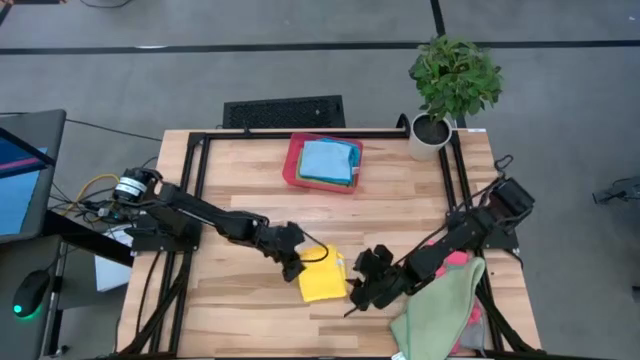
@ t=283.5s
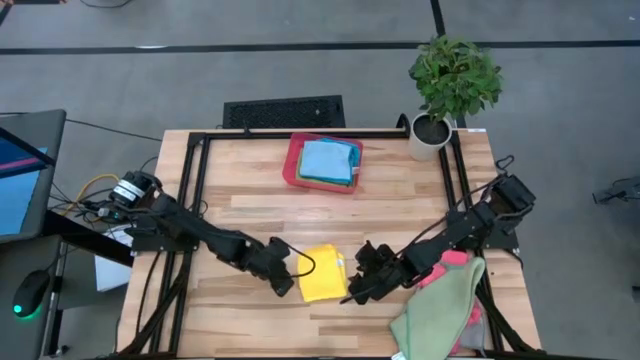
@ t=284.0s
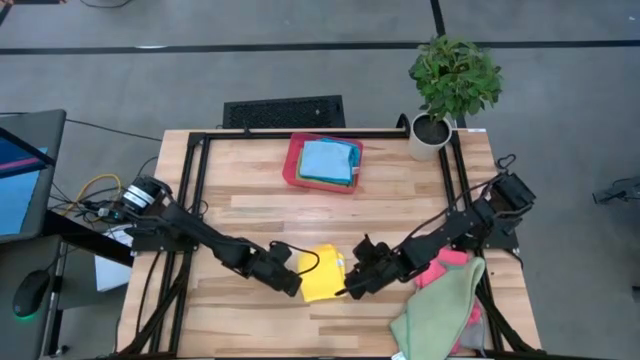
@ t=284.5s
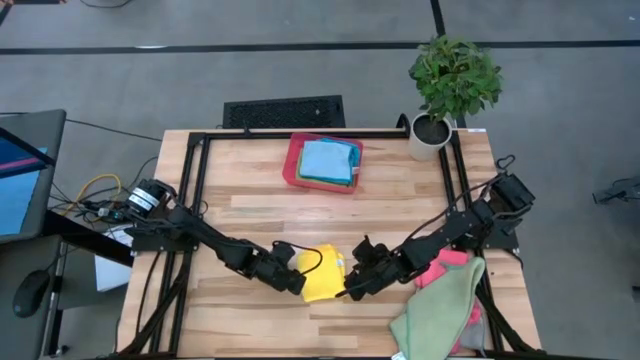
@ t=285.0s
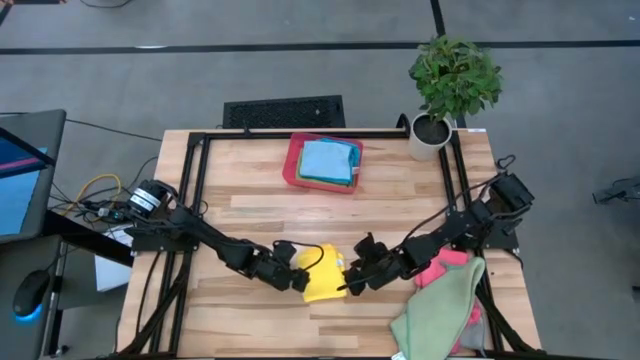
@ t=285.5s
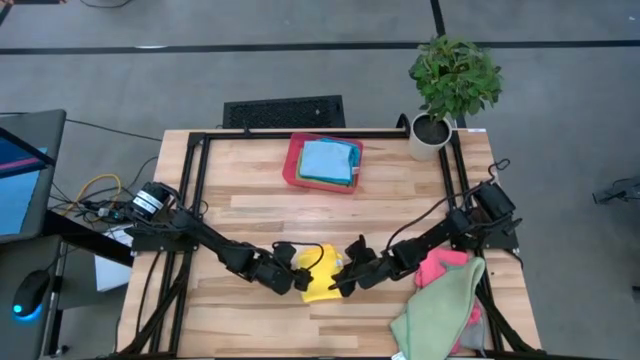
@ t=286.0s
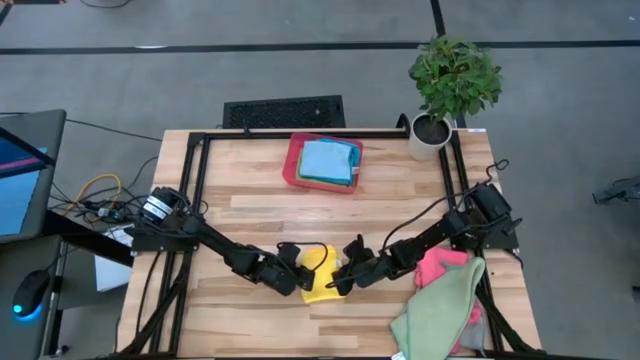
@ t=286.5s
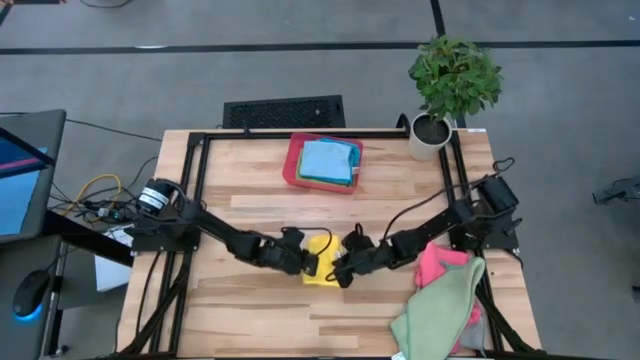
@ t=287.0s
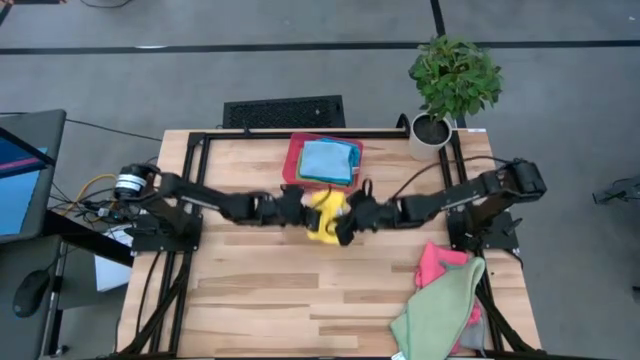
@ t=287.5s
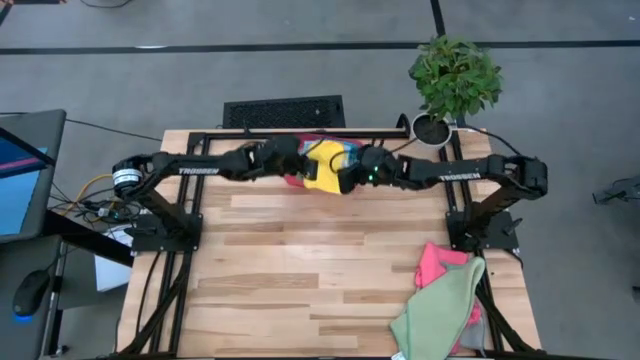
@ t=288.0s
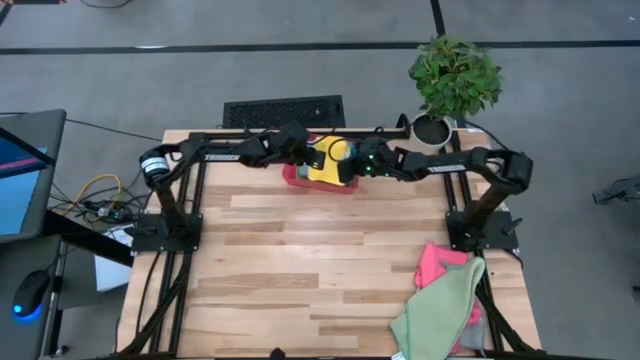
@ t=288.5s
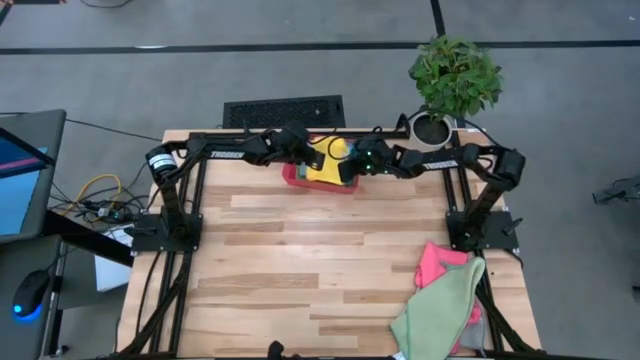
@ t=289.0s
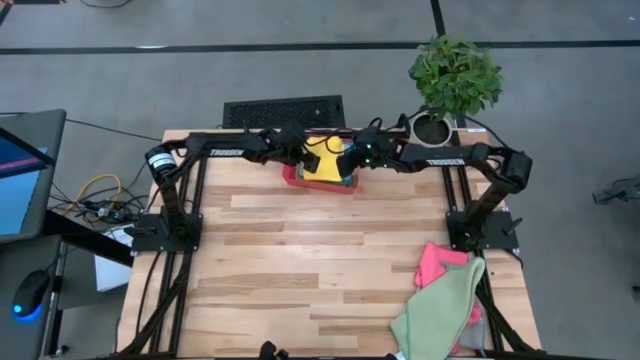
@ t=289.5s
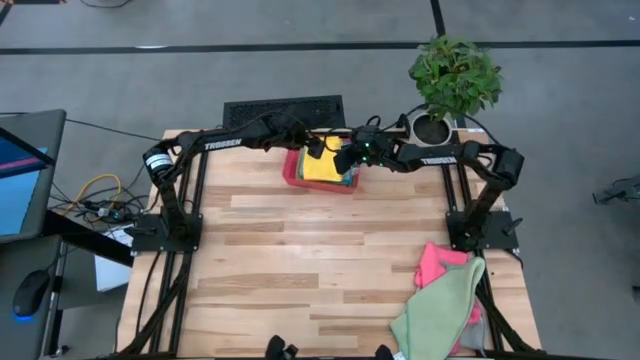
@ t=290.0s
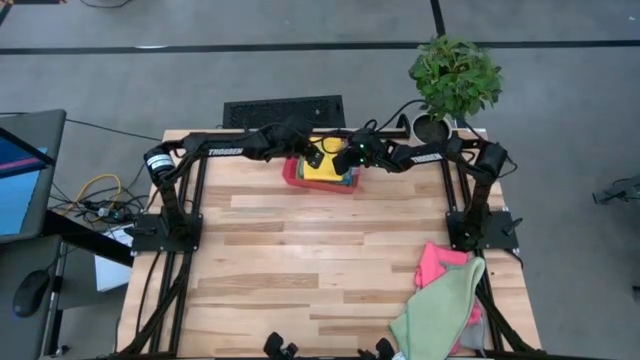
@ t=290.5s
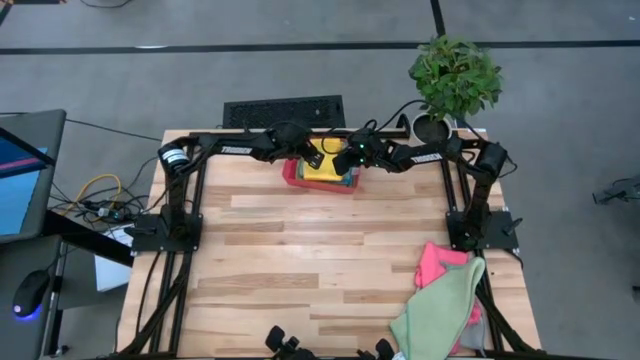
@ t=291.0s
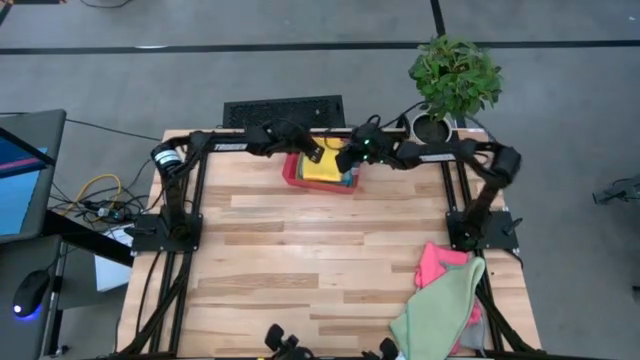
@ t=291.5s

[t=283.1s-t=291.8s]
Task: Fold microfiber towels
Stack the yellow microfiber cloth on top of the light blue microfiber cloth in the red bin

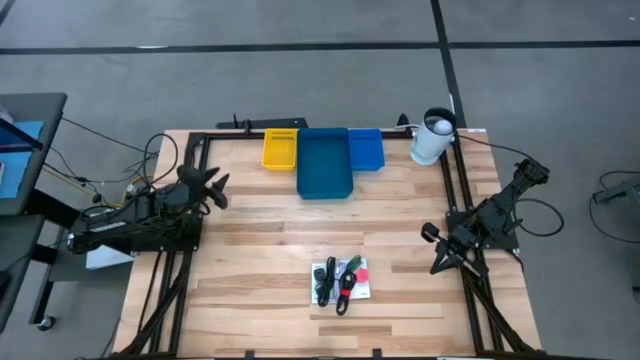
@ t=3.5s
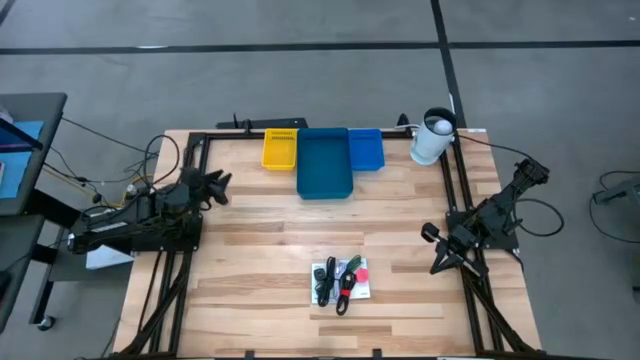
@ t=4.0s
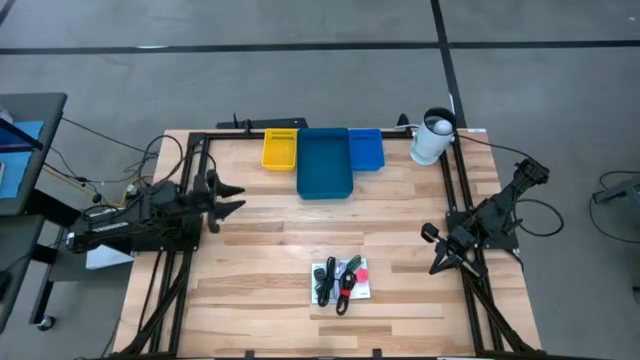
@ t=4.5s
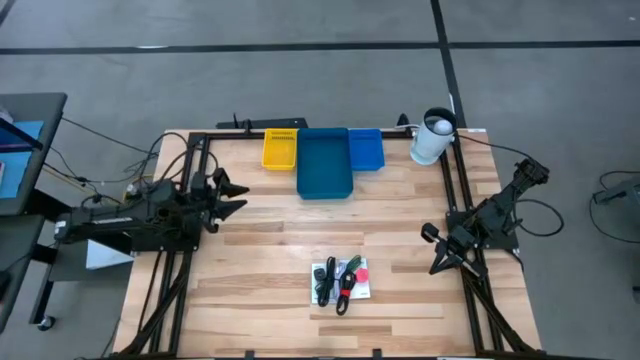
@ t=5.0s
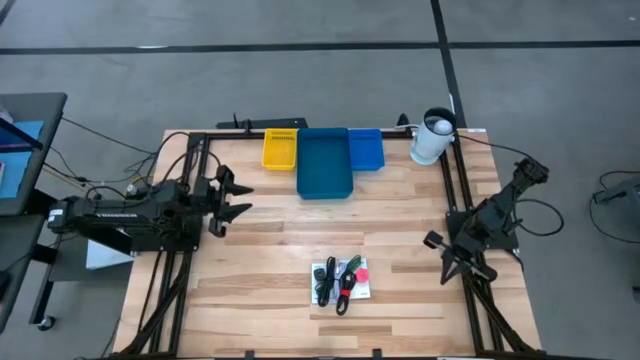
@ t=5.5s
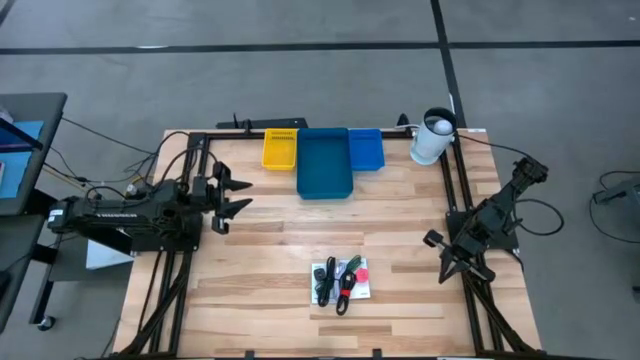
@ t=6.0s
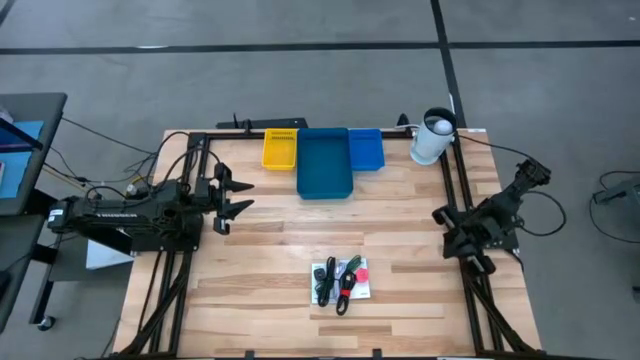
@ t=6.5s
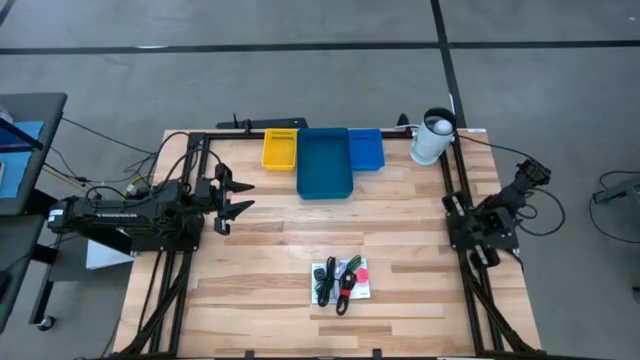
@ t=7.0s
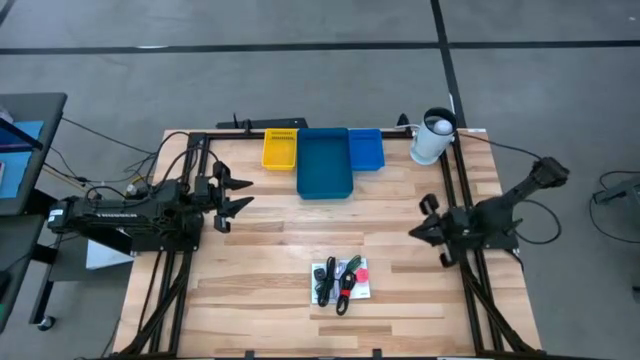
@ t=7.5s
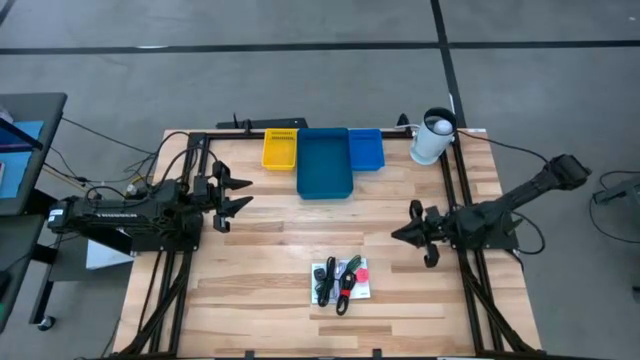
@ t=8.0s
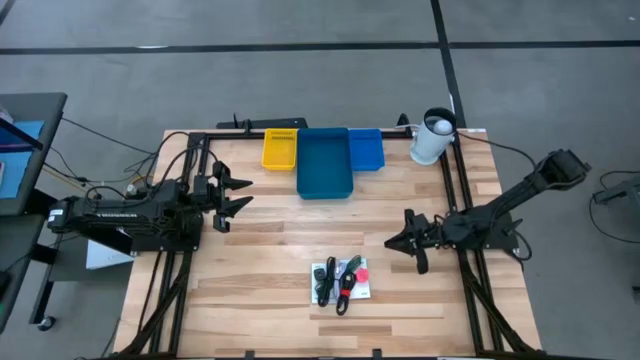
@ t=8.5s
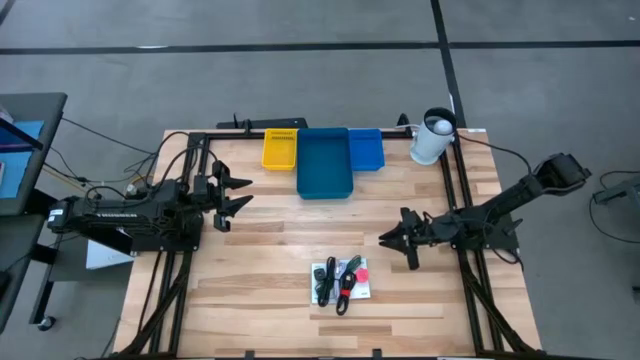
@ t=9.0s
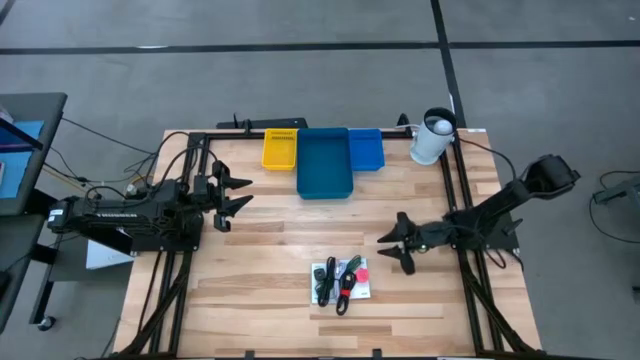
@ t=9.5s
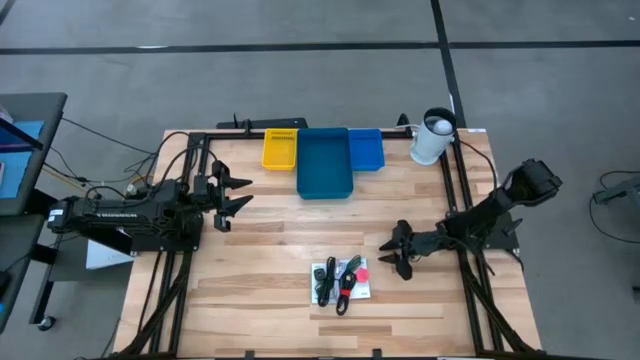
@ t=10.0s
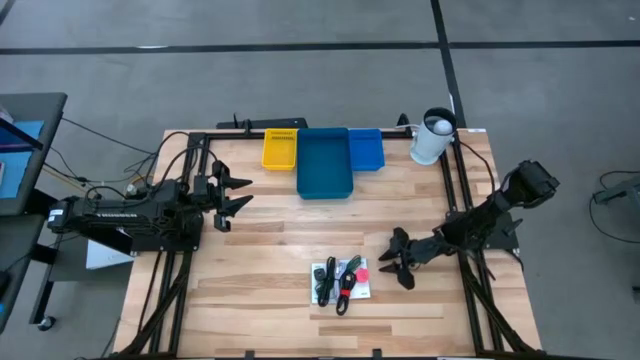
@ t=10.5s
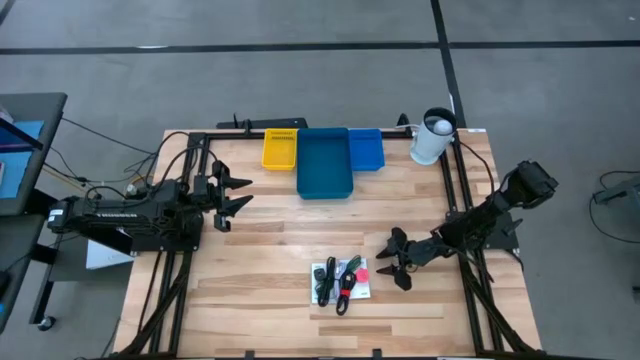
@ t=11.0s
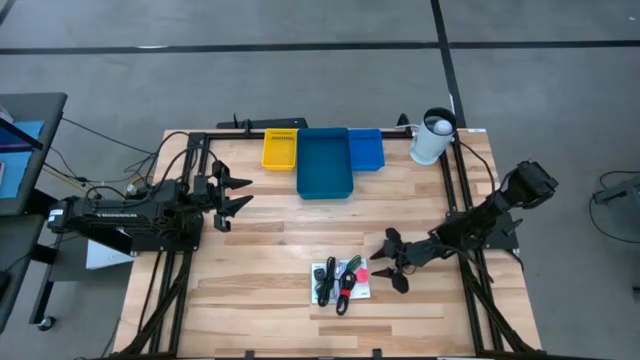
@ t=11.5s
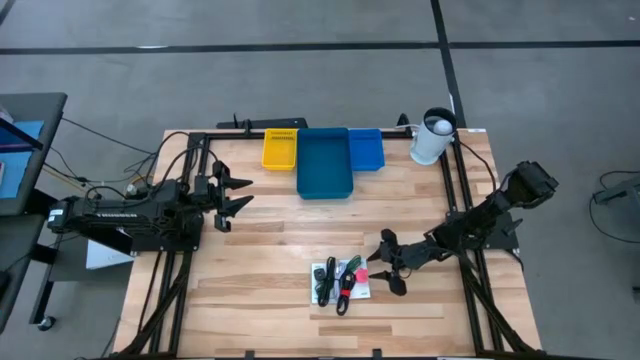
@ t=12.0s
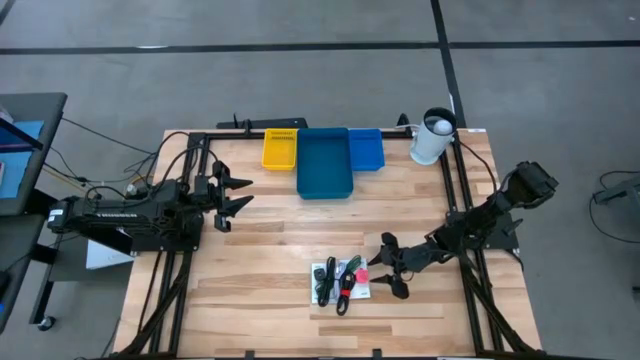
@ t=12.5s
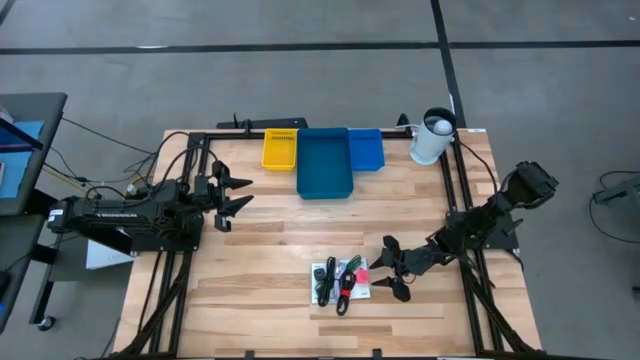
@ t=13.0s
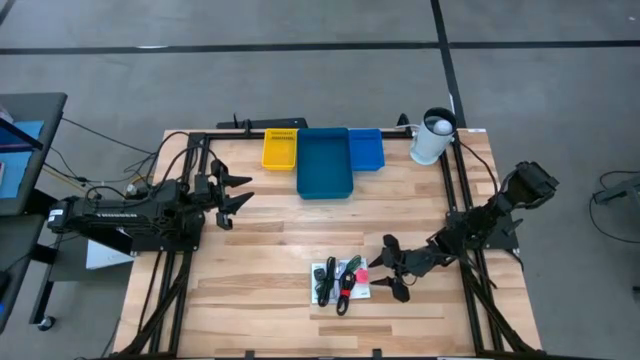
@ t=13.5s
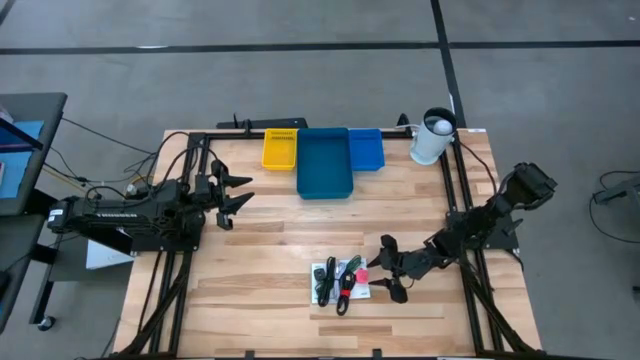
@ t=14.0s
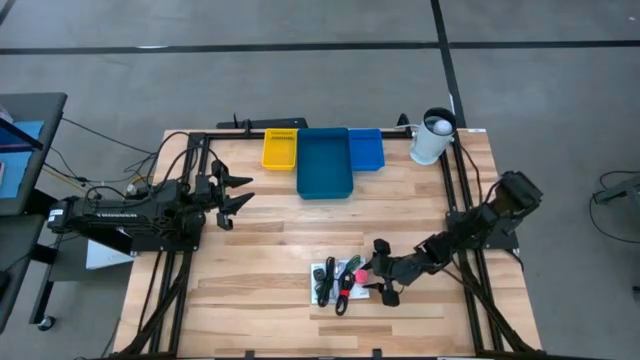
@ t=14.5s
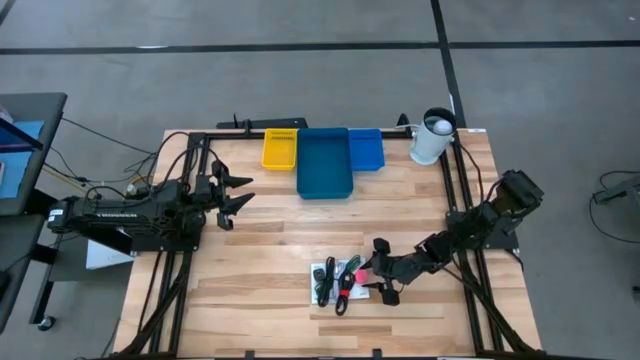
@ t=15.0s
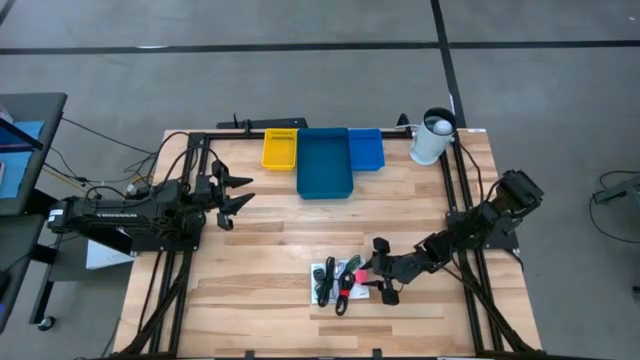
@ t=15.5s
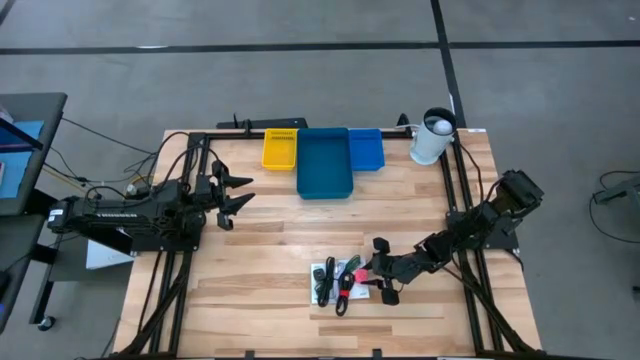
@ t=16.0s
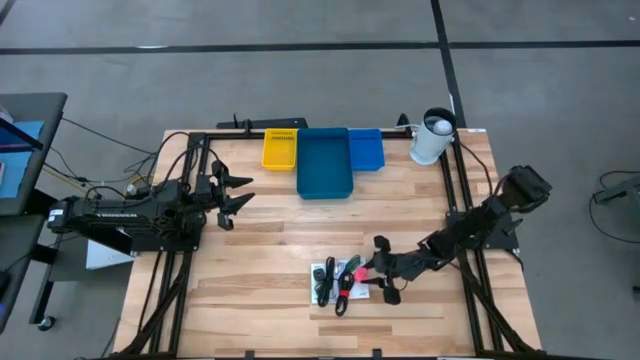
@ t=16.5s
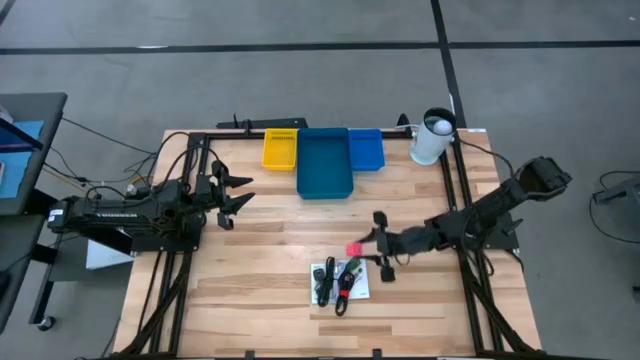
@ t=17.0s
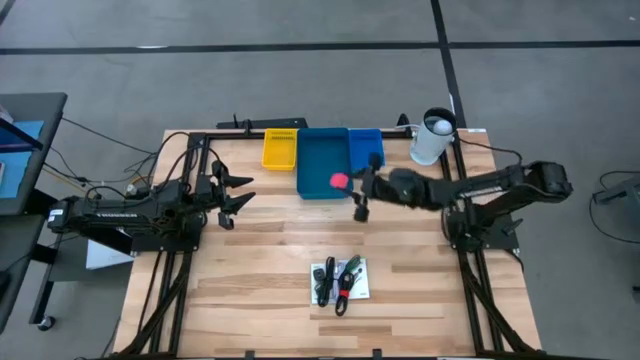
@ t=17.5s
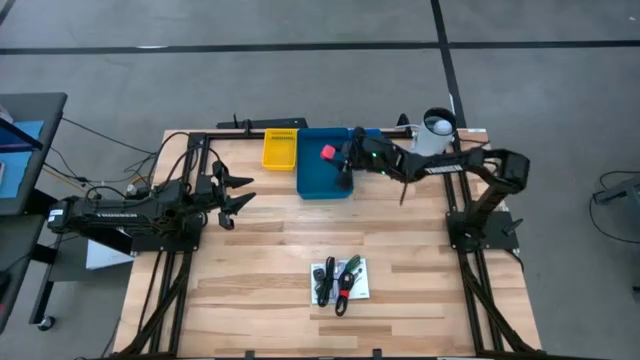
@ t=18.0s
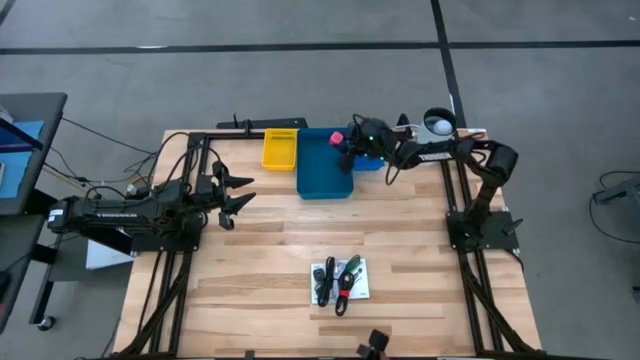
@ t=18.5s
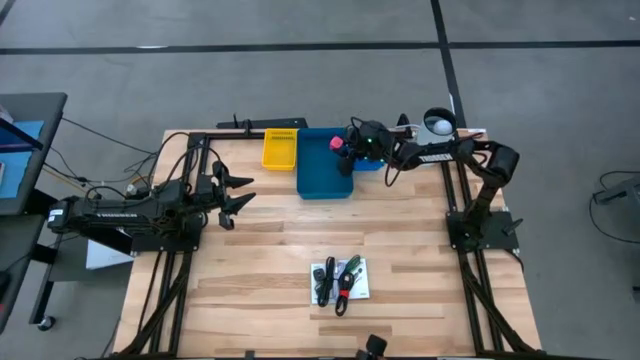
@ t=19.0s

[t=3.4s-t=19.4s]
Task: Pick and place items into bin
Put the pink charger adapter into the dark blue bin
